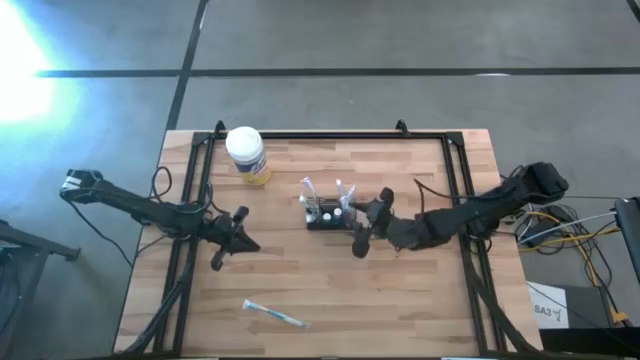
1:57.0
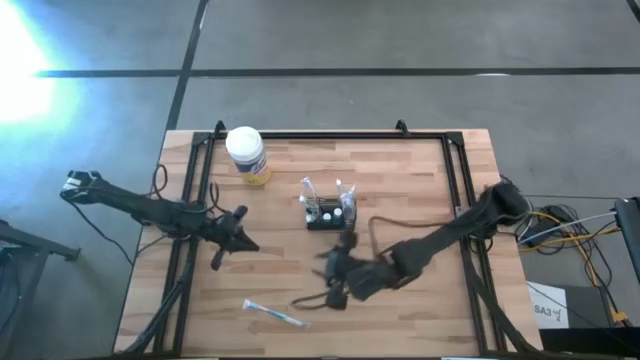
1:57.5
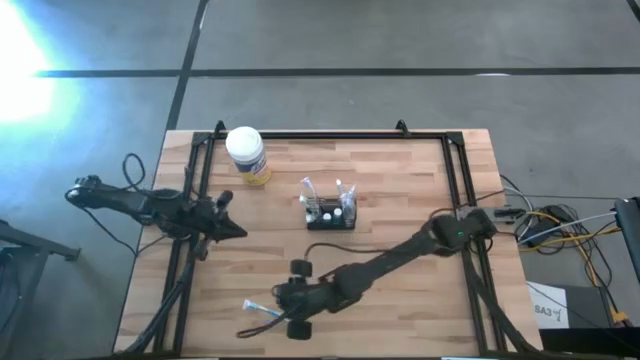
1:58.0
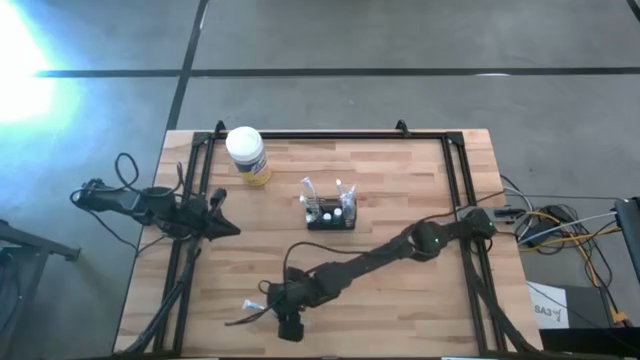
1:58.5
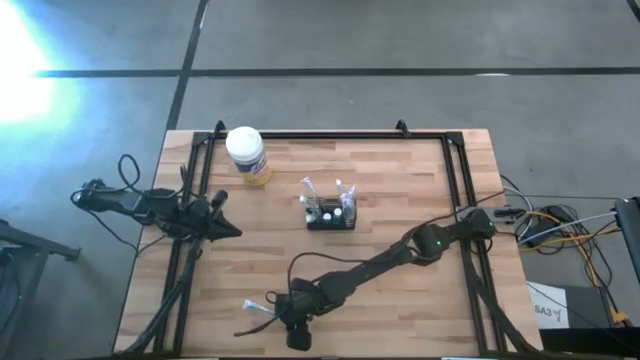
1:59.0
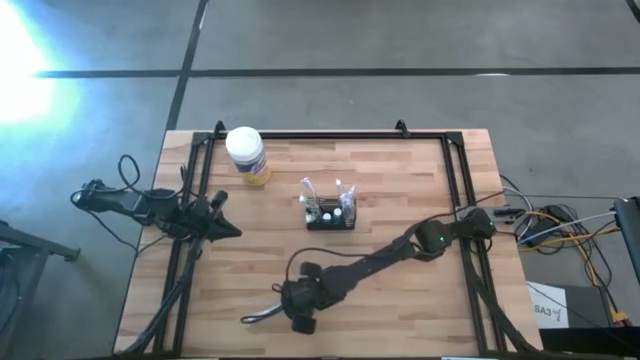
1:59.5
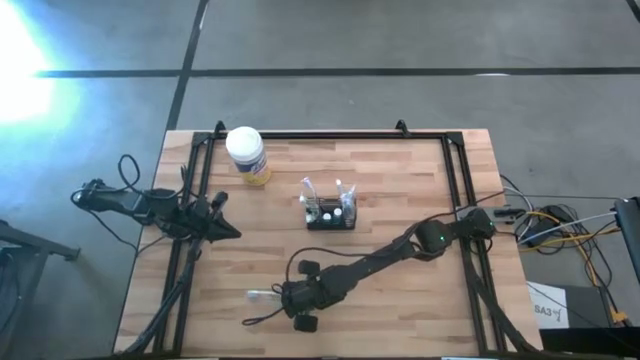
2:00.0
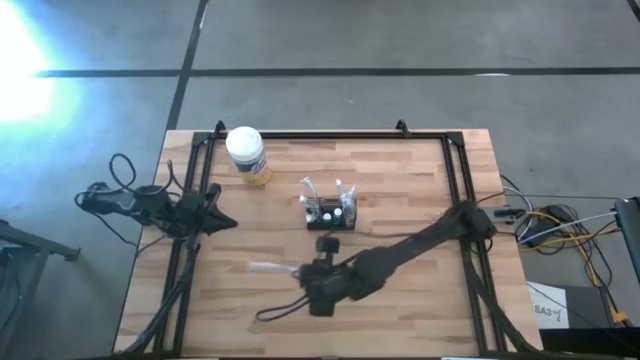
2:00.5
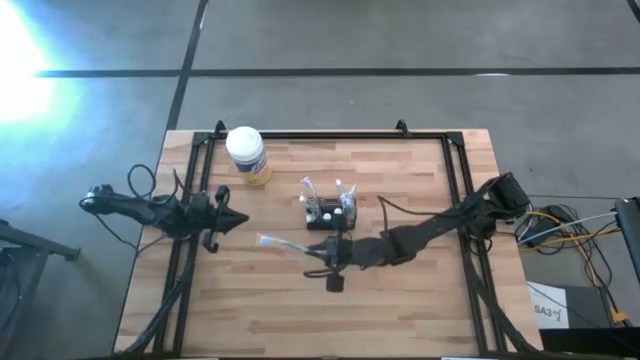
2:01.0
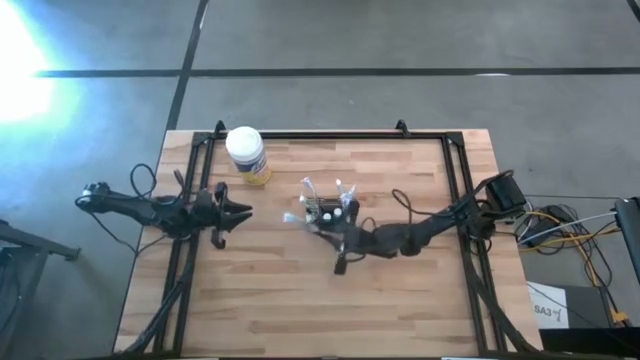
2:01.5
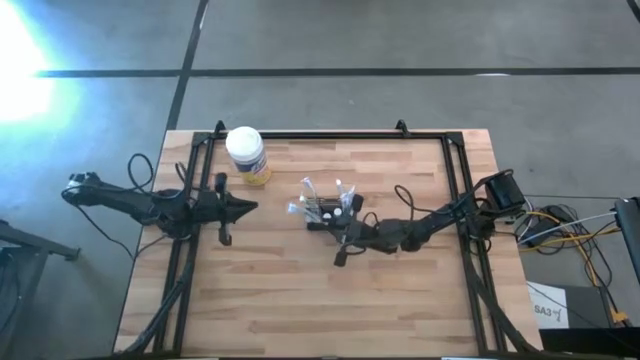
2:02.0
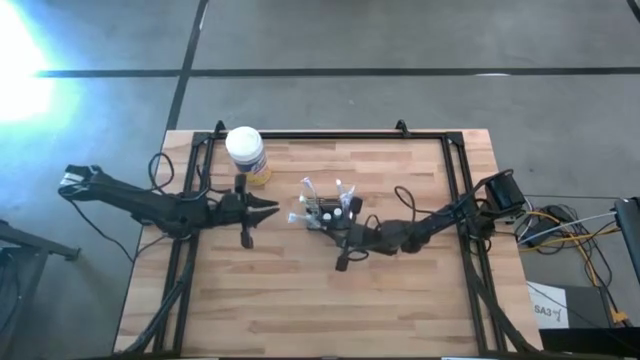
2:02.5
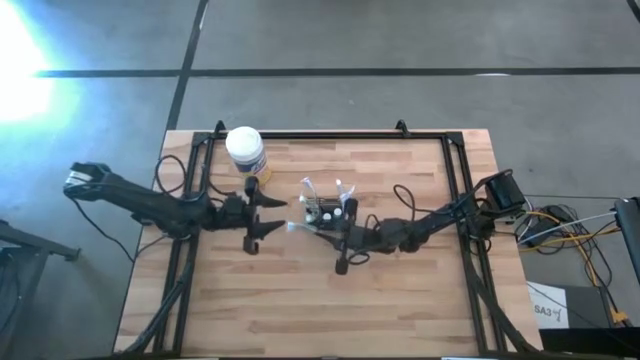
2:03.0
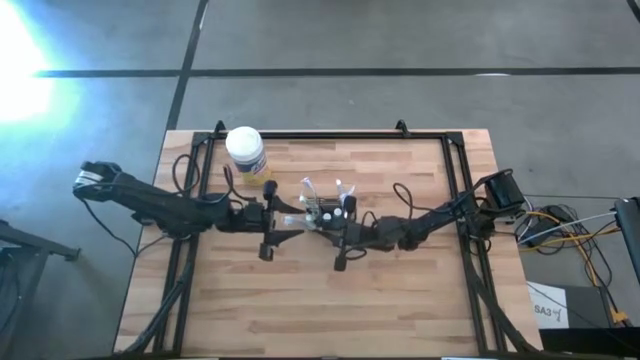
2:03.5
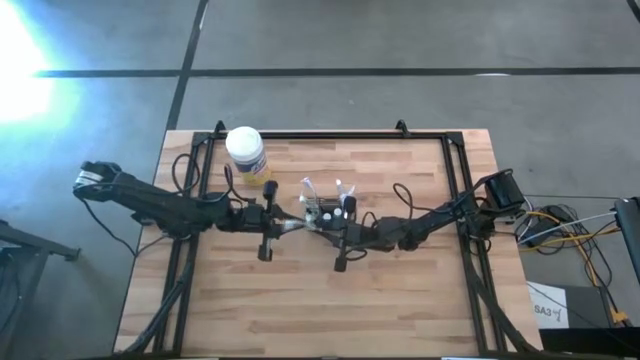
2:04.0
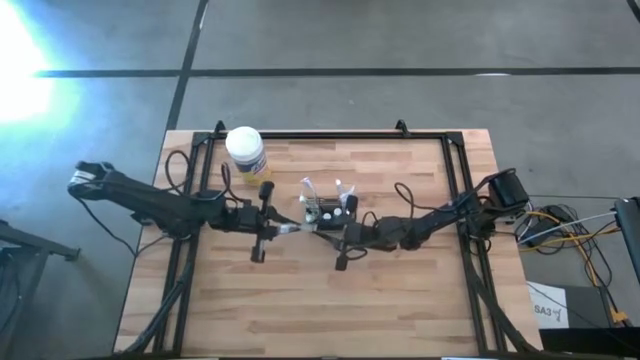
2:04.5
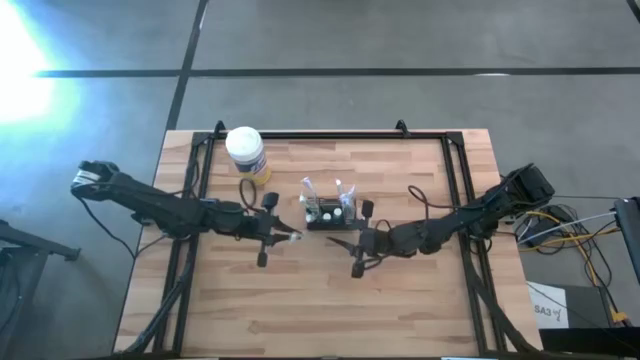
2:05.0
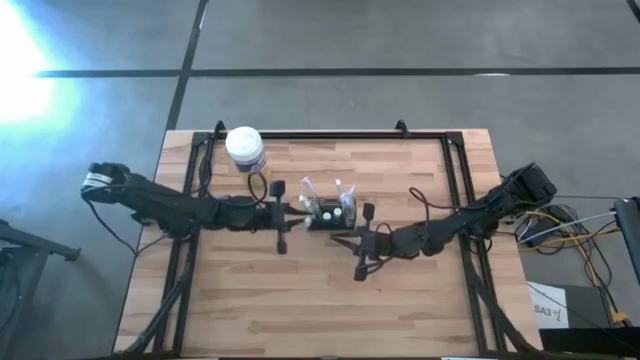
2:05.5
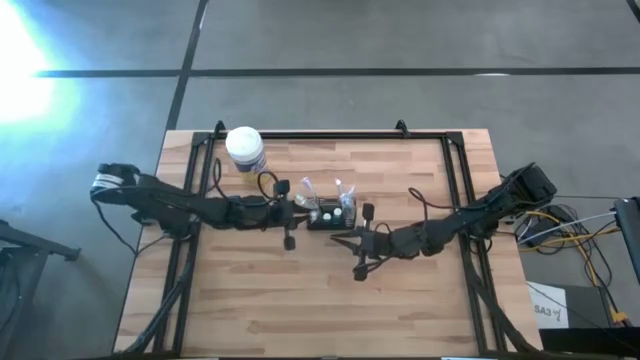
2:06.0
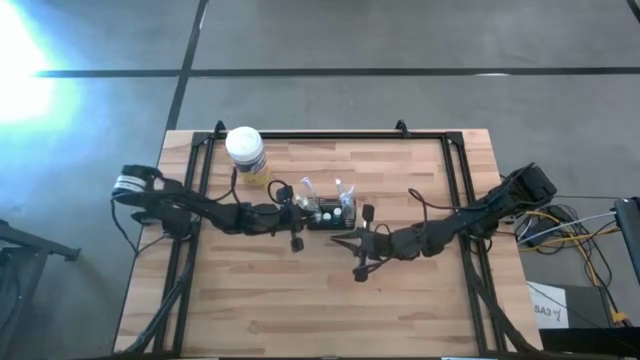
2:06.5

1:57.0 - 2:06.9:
Task: Pick & Place toothbrushing station
Put the blue toothbrush into the wire organizer

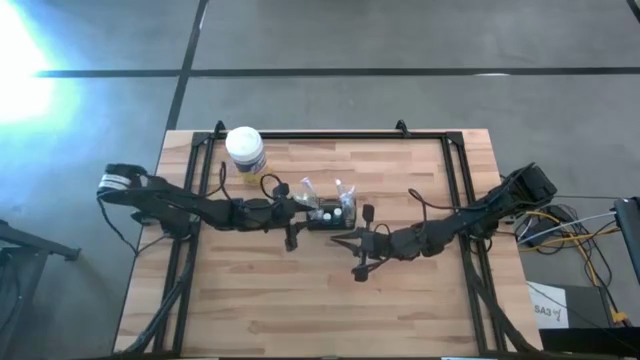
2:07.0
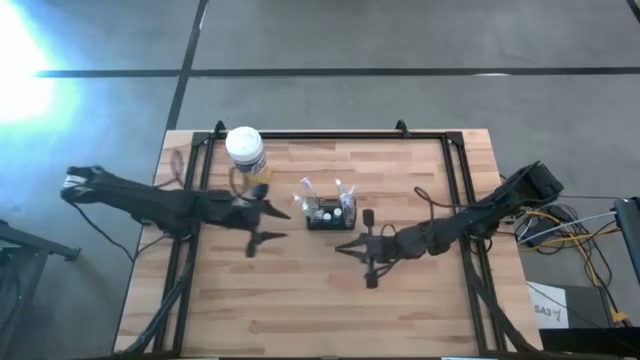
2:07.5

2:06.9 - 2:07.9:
Return to Home Position
